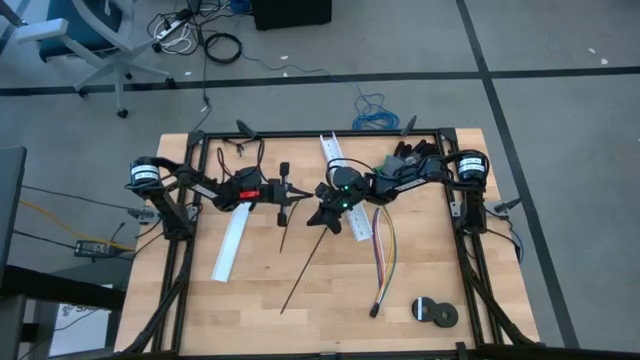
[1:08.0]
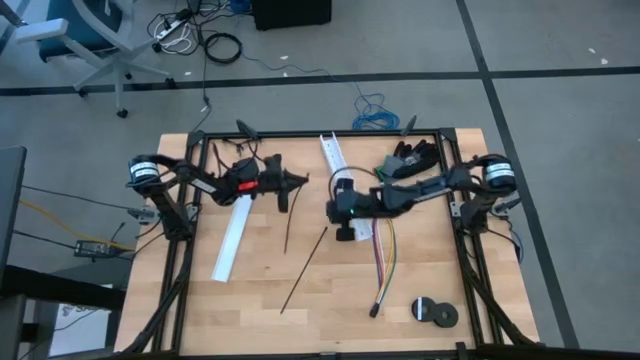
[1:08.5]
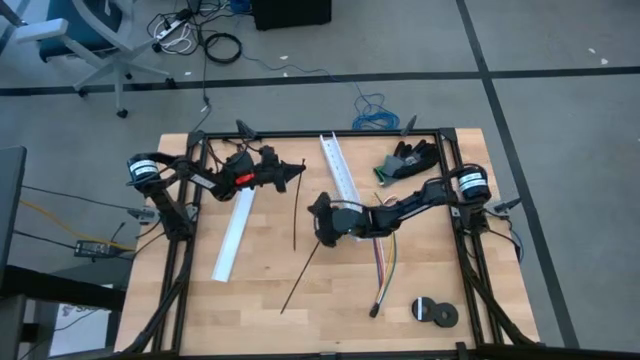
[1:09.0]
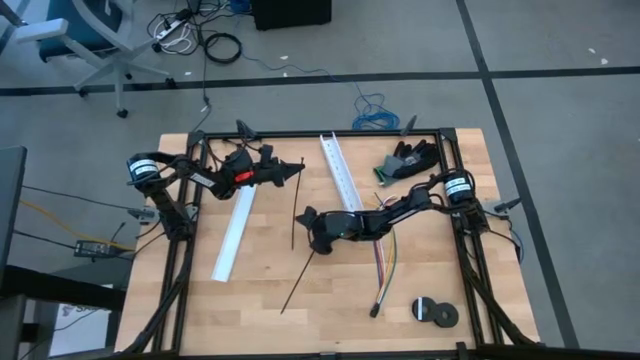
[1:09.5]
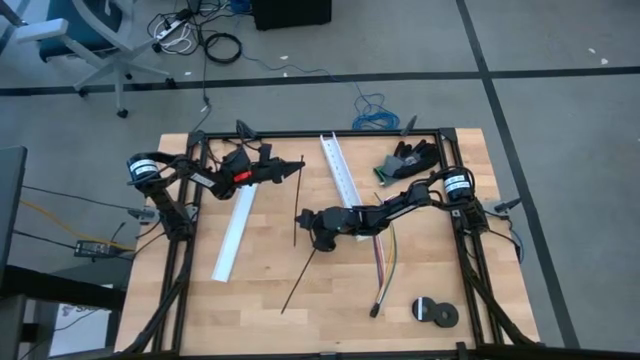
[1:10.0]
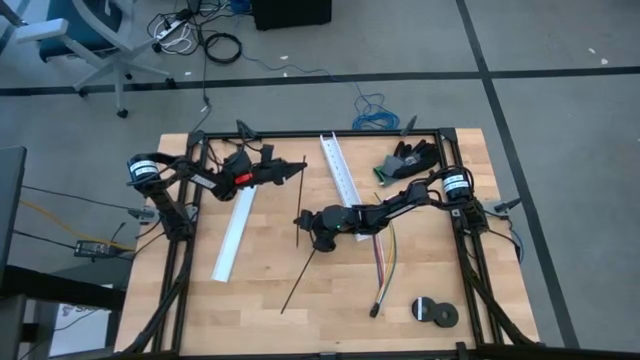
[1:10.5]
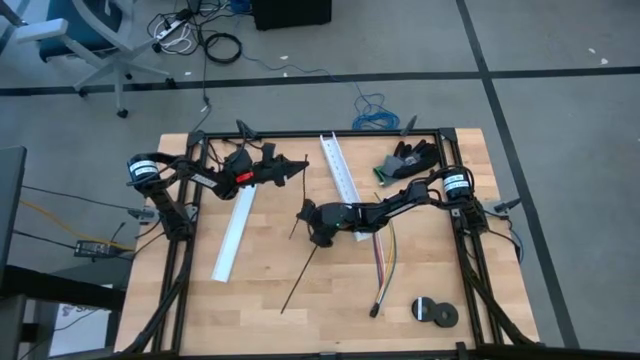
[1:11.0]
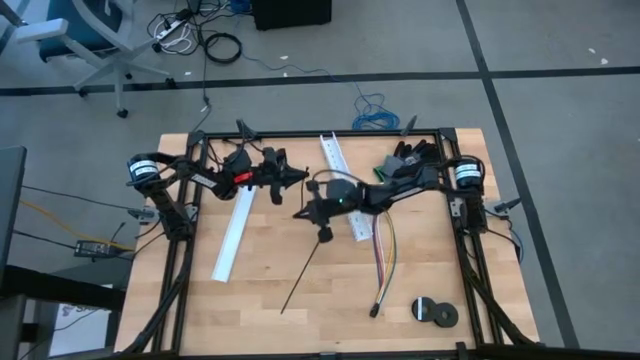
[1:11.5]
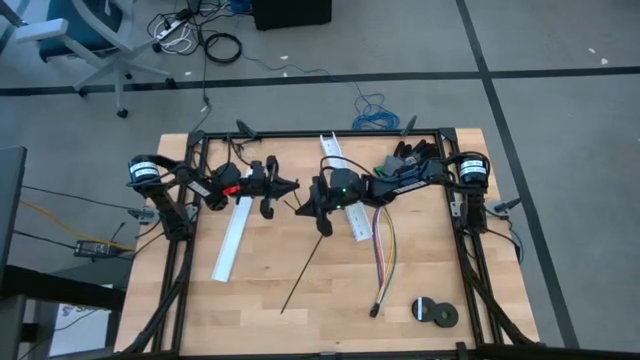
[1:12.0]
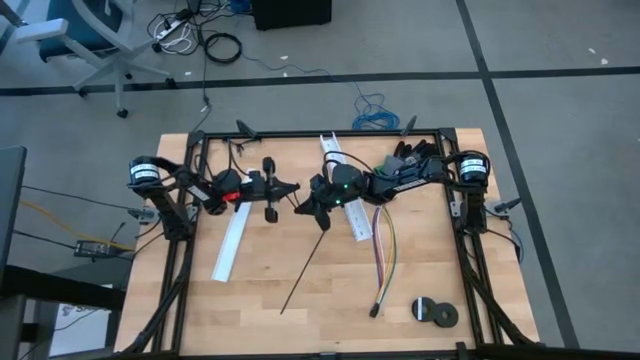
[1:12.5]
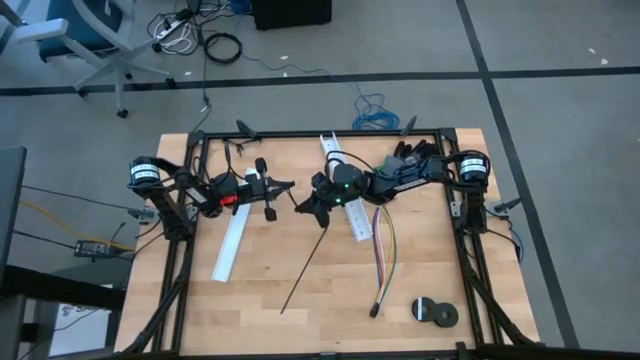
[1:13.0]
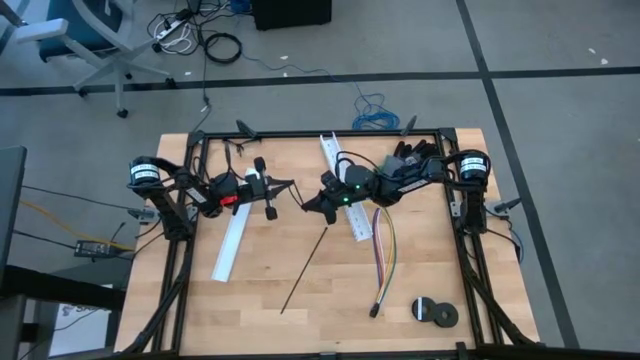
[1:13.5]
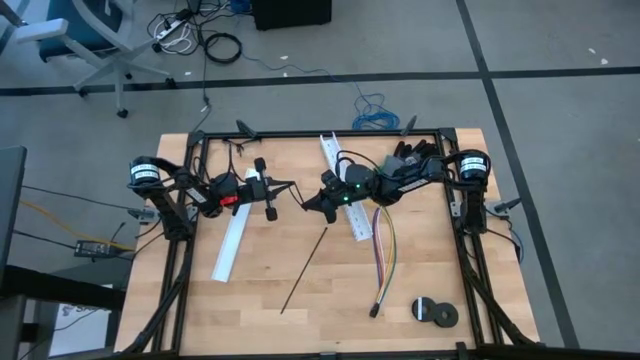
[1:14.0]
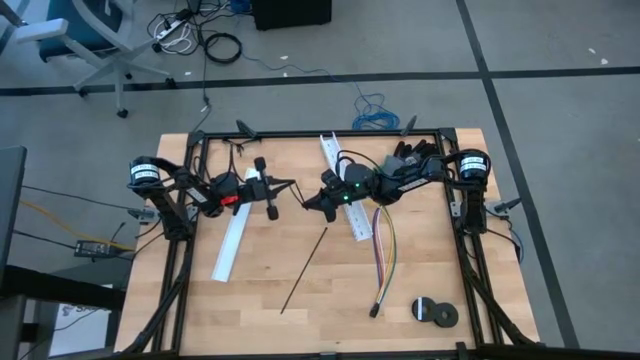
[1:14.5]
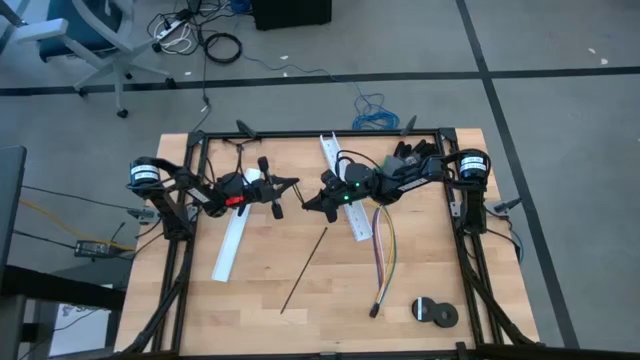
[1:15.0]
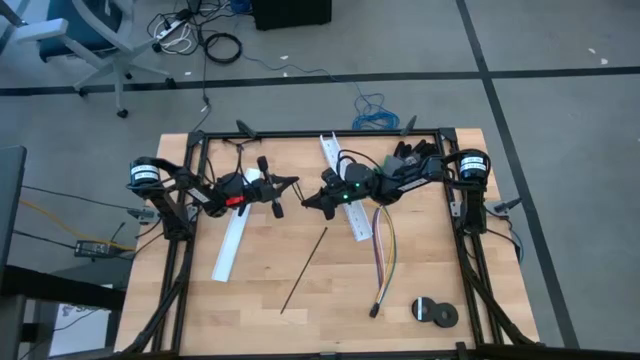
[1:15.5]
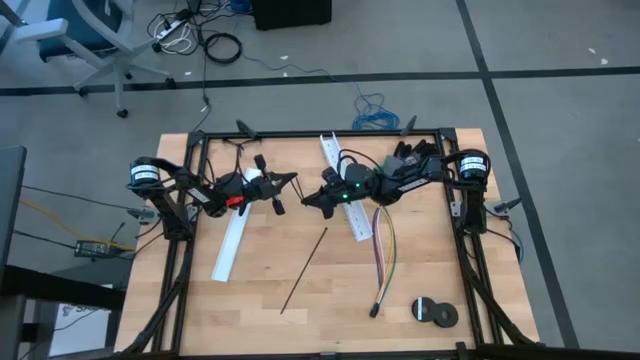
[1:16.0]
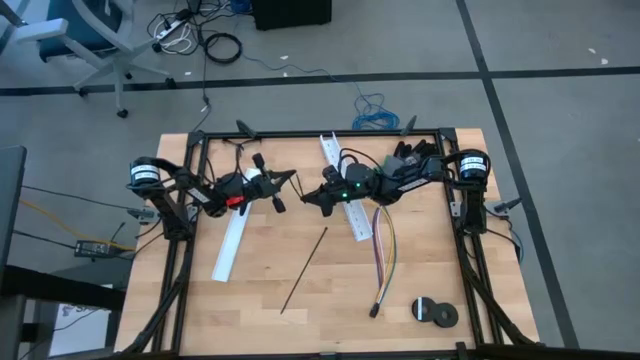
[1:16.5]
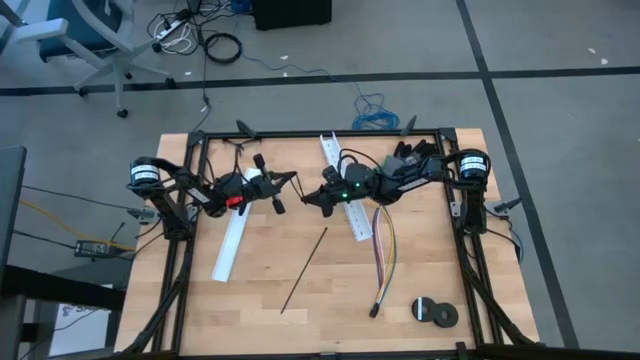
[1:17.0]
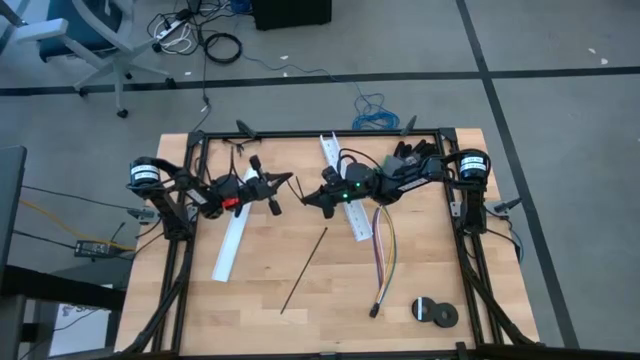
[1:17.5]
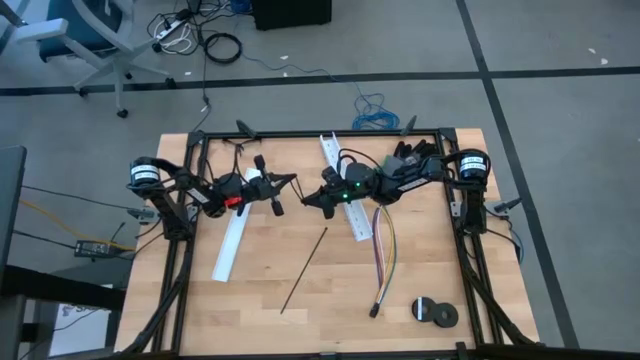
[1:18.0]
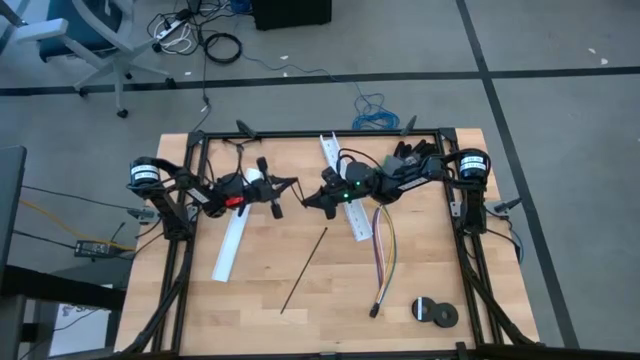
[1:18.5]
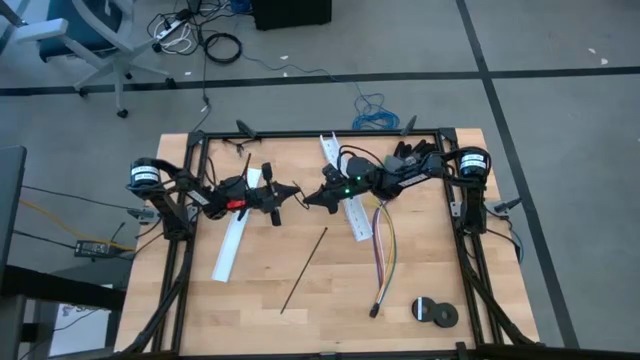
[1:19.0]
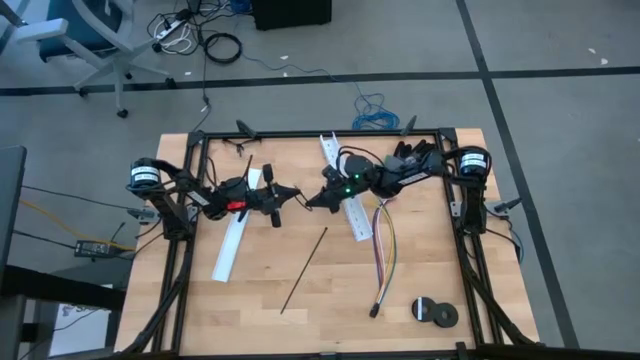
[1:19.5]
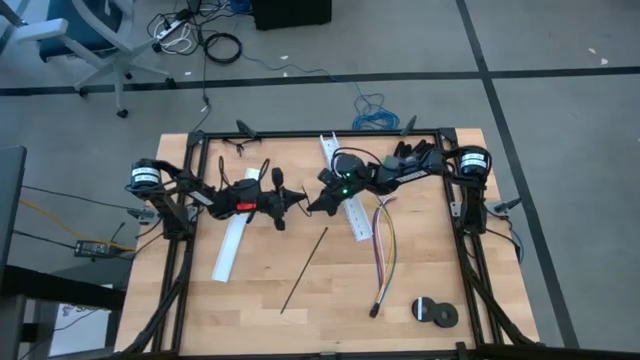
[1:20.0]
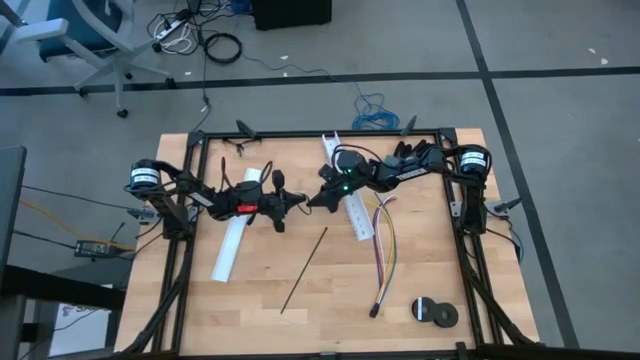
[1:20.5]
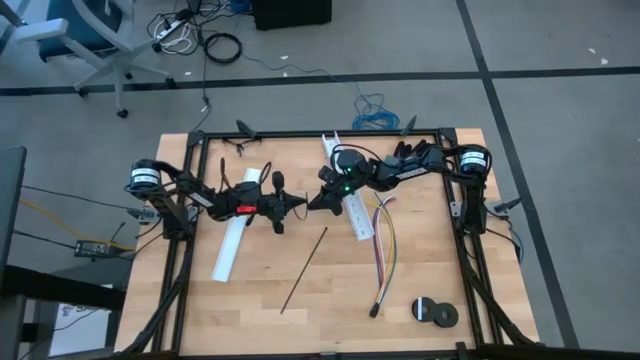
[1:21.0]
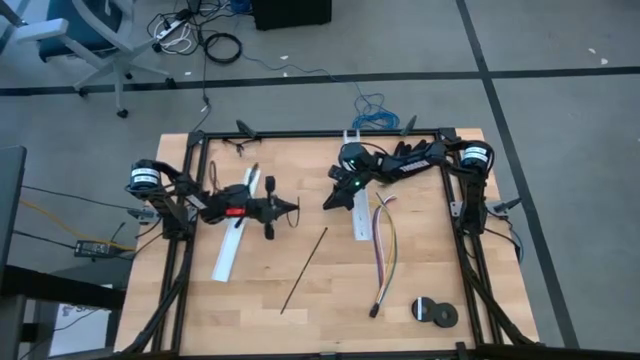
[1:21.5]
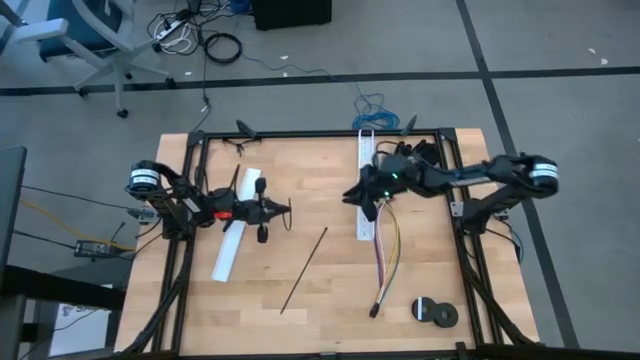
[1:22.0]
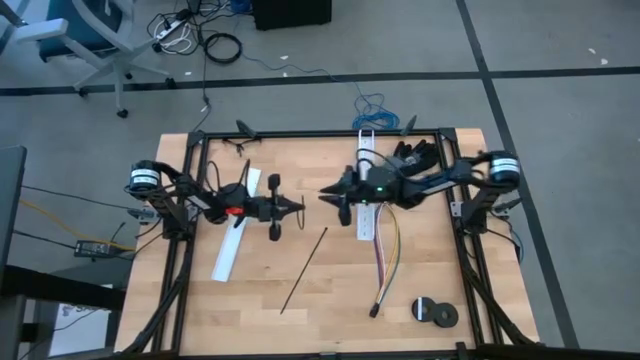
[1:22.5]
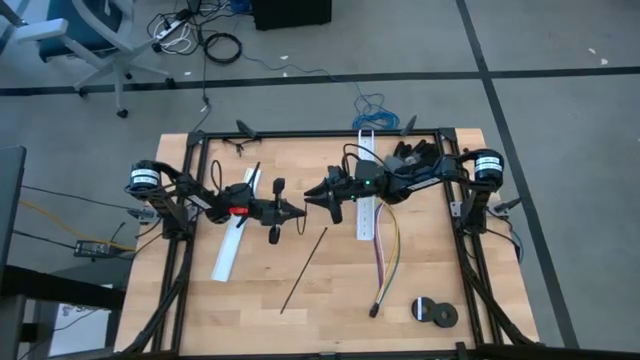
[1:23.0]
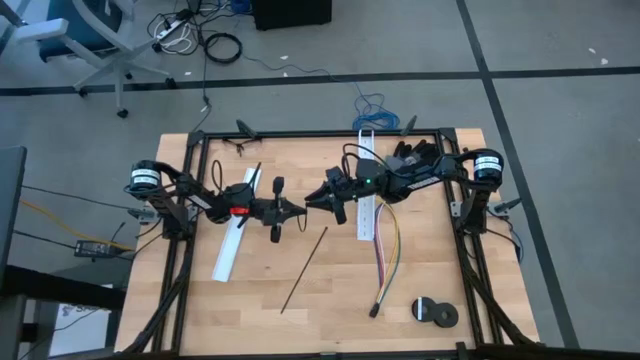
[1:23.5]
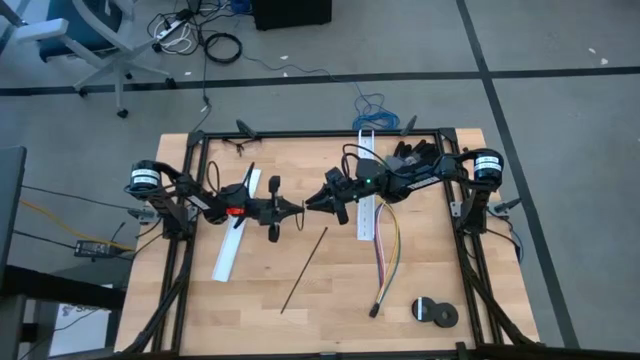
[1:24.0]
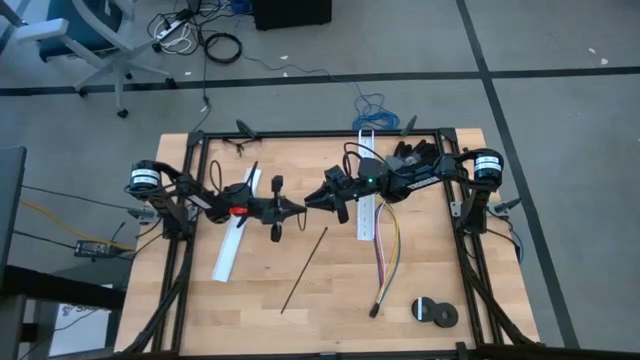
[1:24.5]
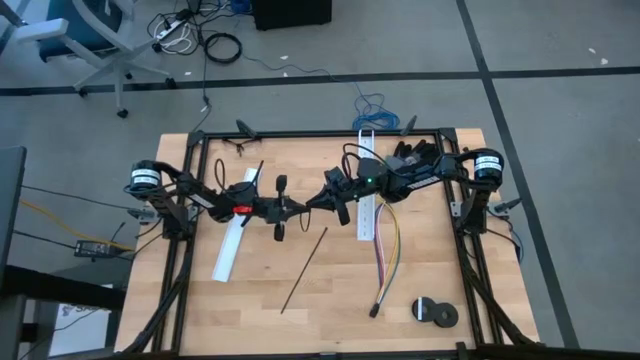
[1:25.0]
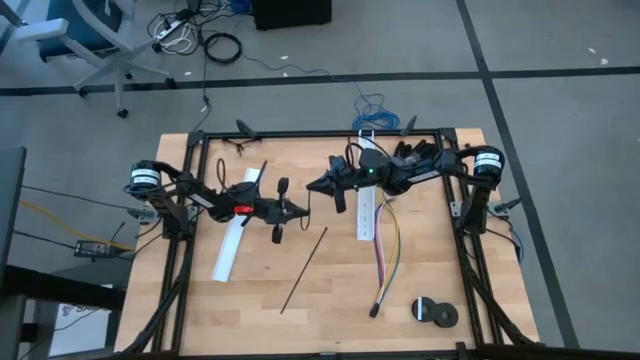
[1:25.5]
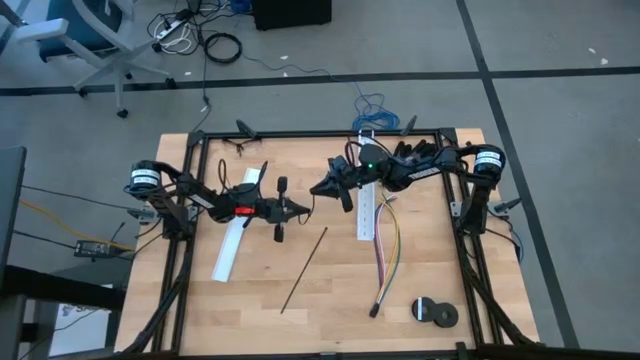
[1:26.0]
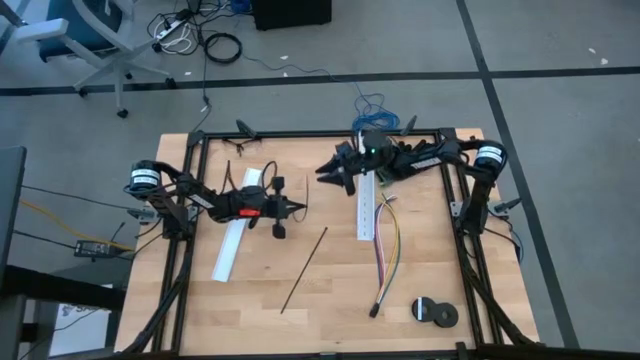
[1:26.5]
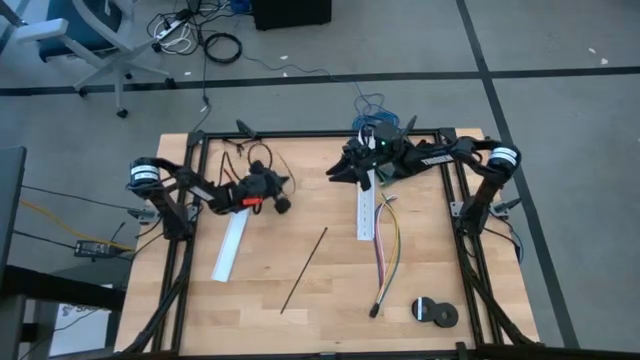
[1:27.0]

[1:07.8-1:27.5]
Task: Ziptie cables
Prepare the black zip tie

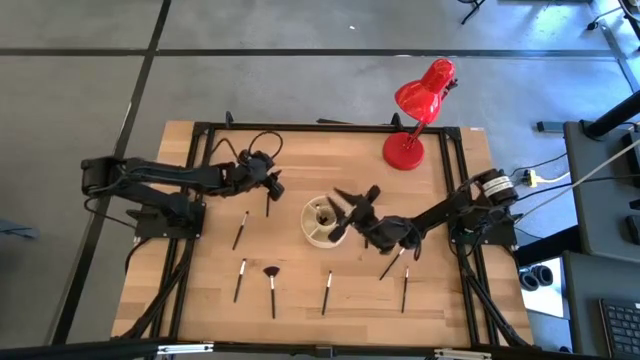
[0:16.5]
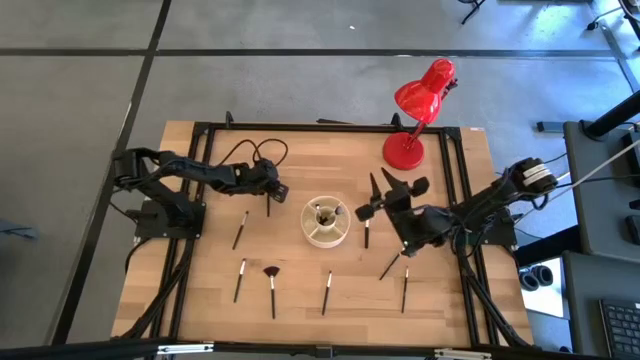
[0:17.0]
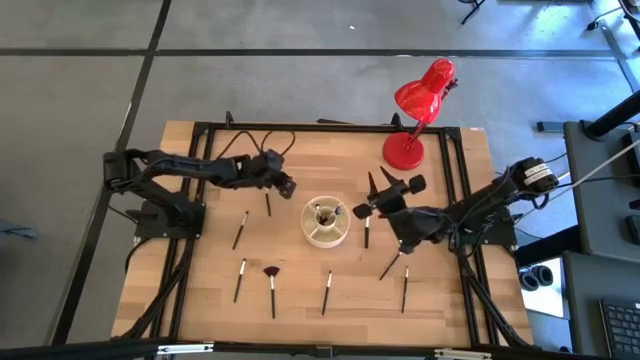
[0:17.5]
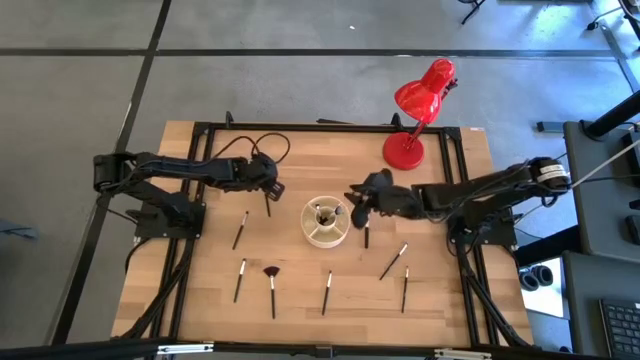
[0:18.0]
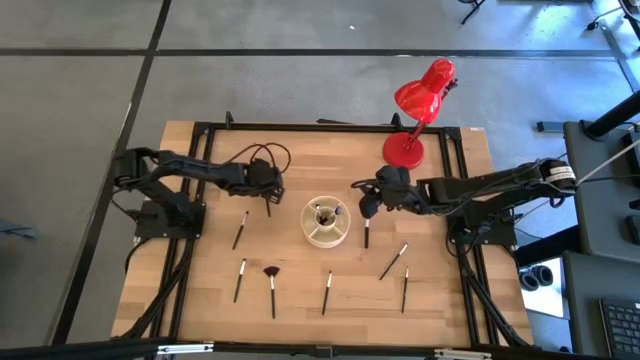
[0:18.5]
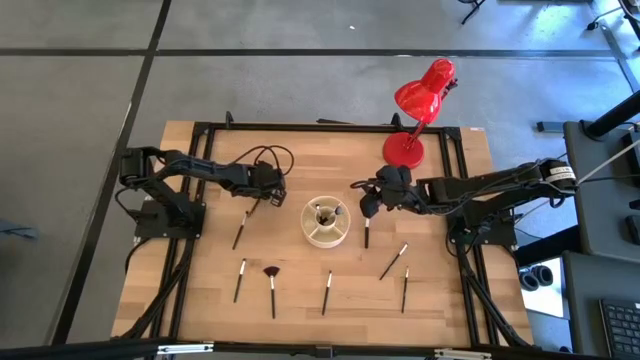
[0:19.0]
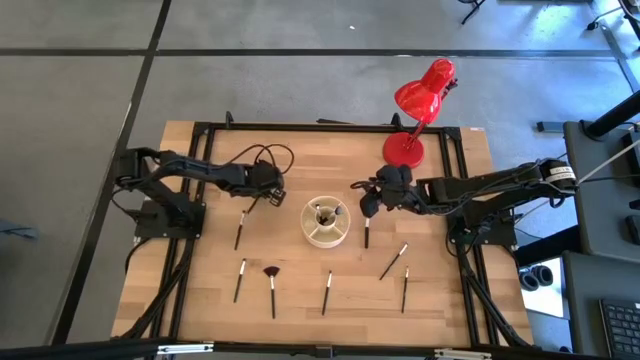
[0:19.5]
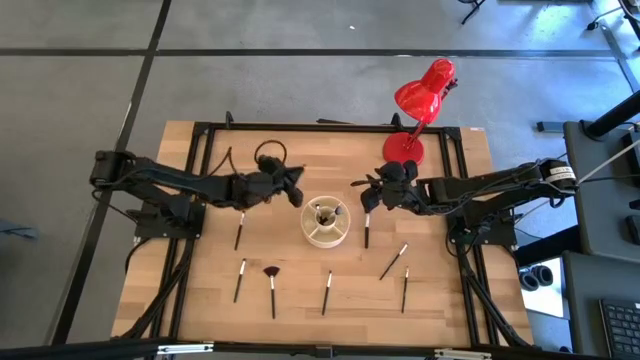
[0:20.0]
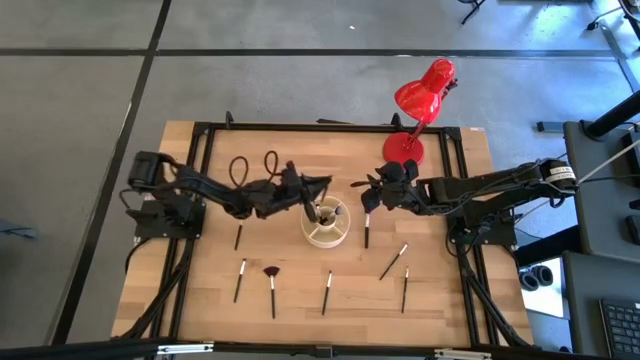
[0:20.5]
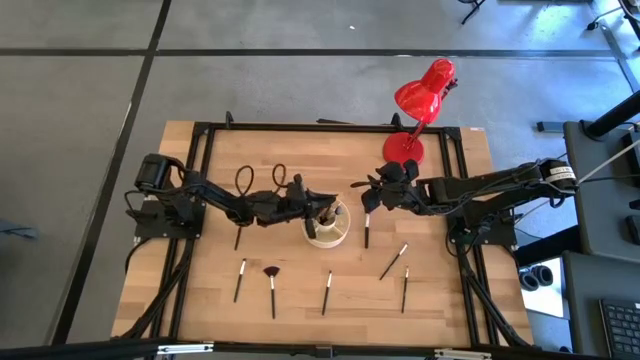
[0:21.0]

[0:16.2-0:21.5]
Task: Put items in baskets/containers
Put the black eyeshadow brush into the white brush holder
